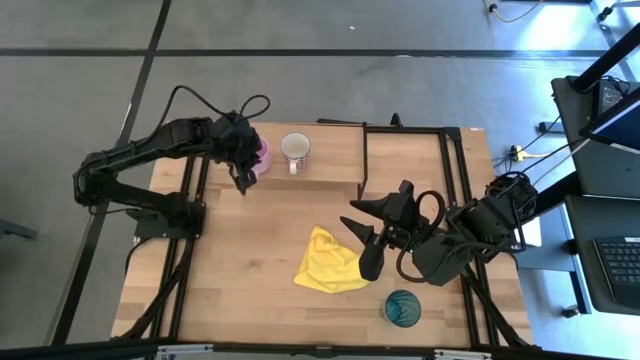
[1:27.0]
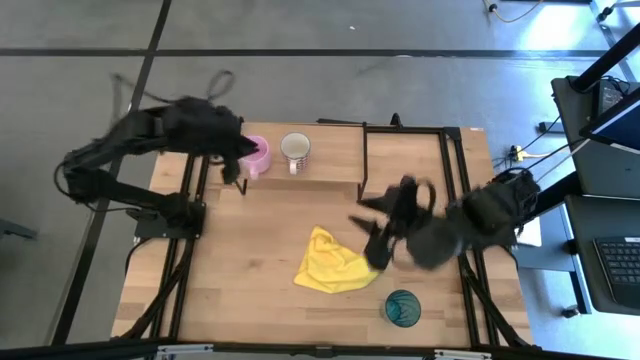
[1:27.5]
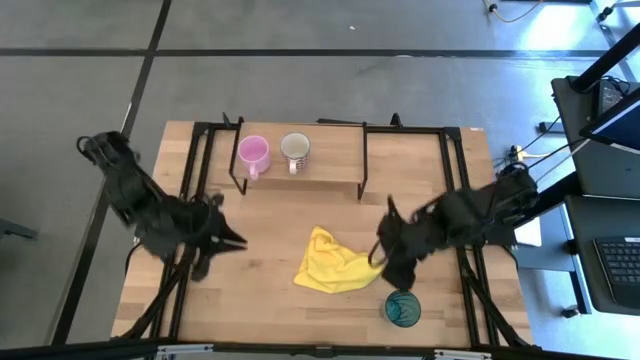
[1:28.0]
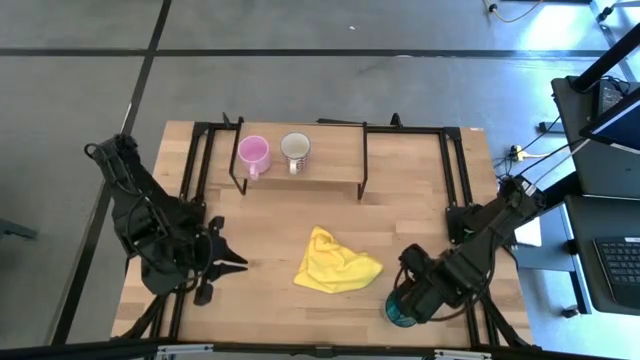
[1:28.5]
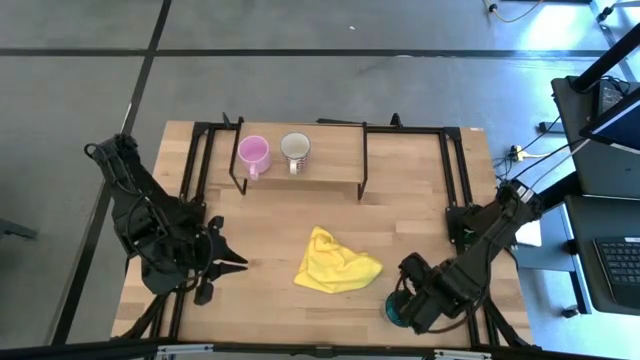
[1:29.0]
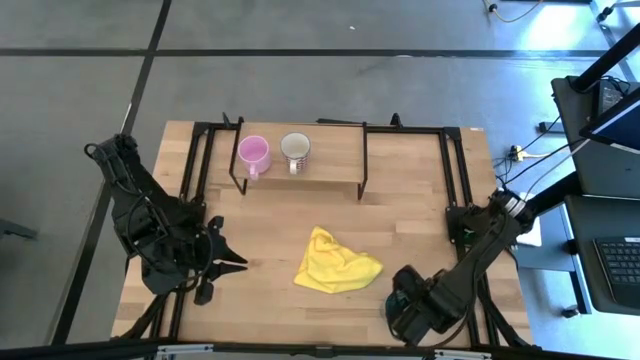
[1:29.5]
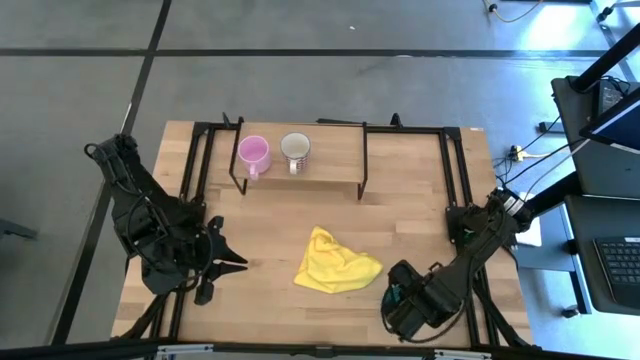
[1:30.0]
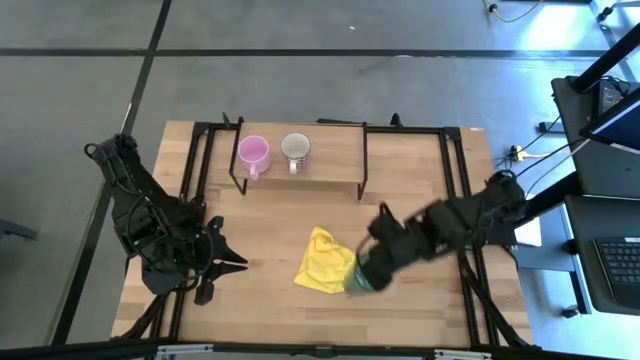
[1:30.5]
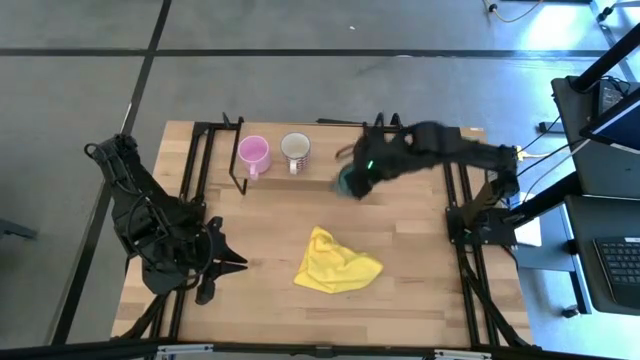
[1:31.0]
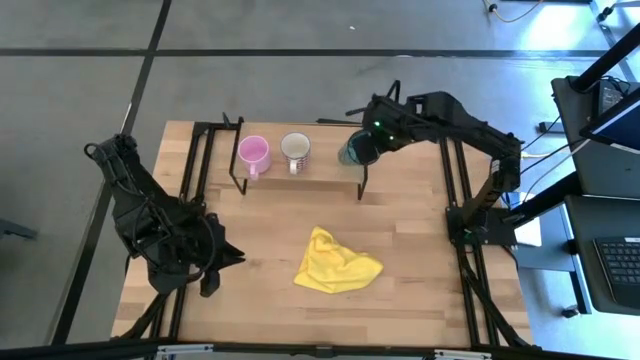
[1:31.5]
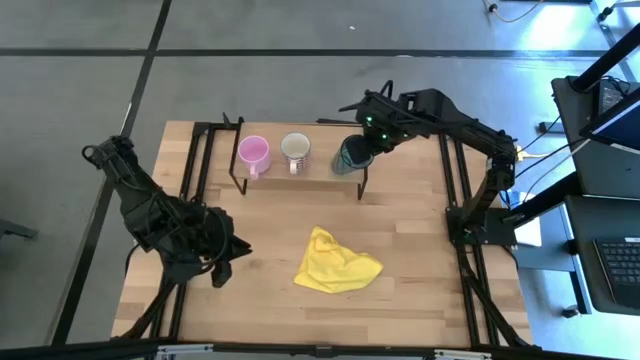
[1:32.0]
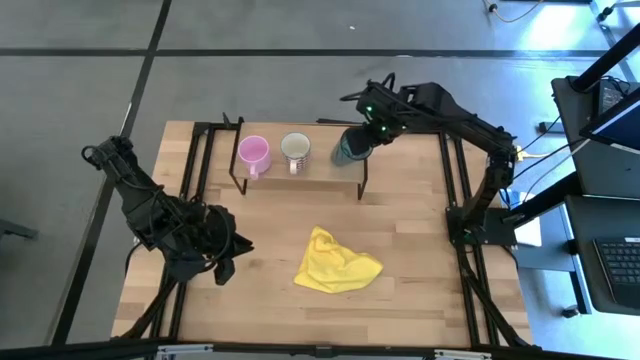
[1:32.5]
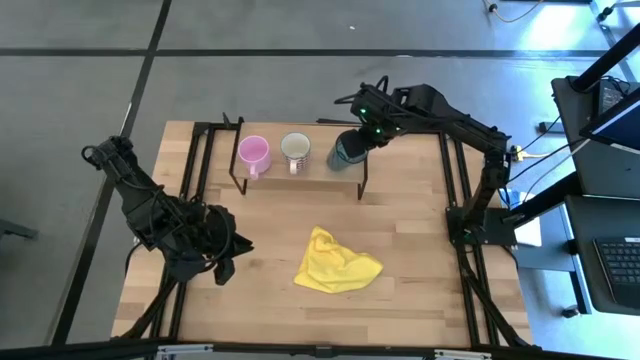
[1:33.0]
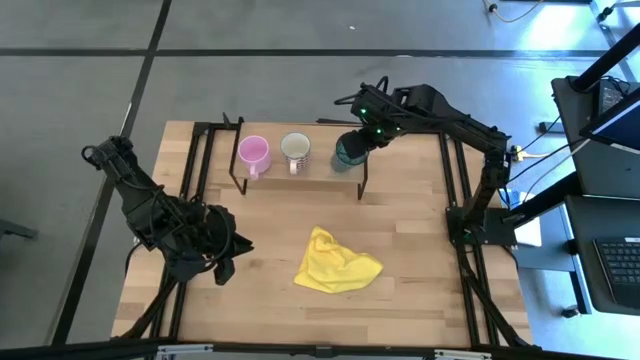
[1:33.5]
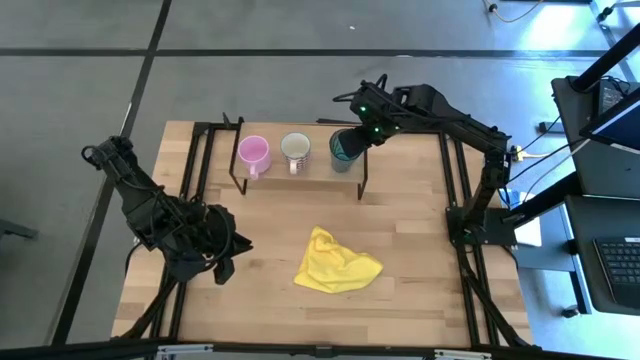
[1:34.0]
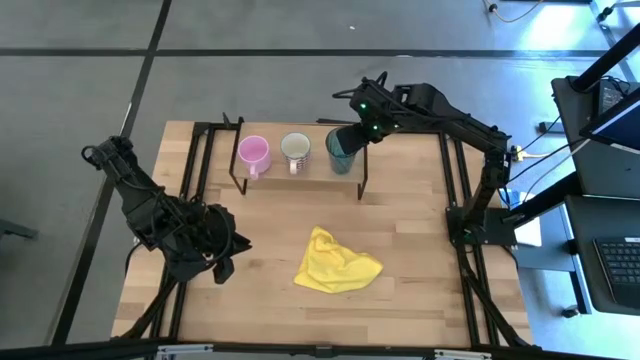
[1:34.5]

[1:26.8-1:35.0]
Task: Stack small to large cups/mugs on shelf
Put the blue cup on the shelf

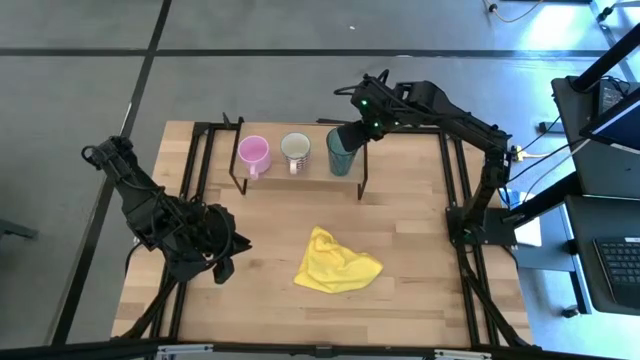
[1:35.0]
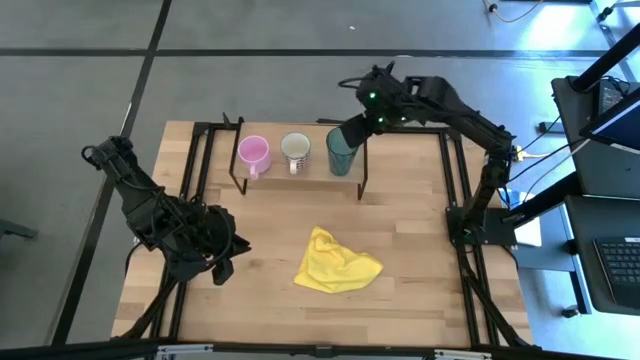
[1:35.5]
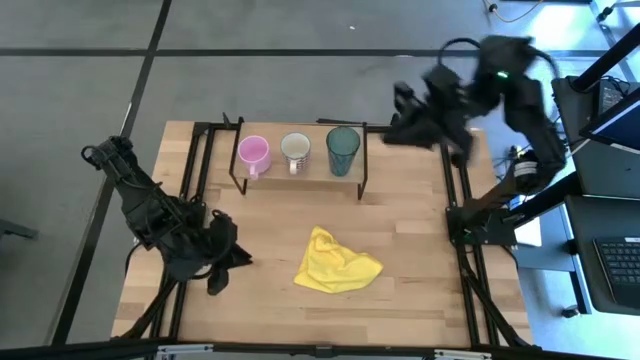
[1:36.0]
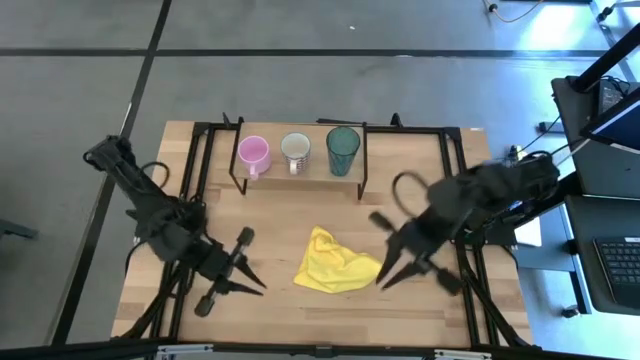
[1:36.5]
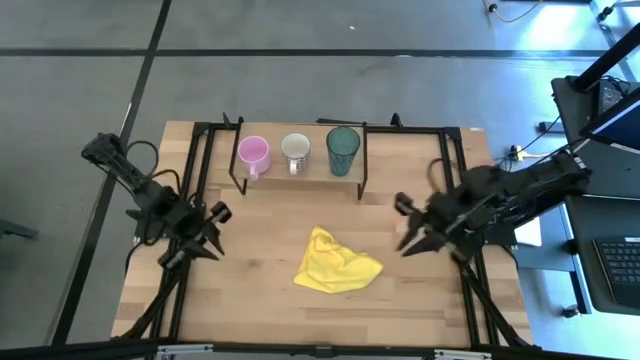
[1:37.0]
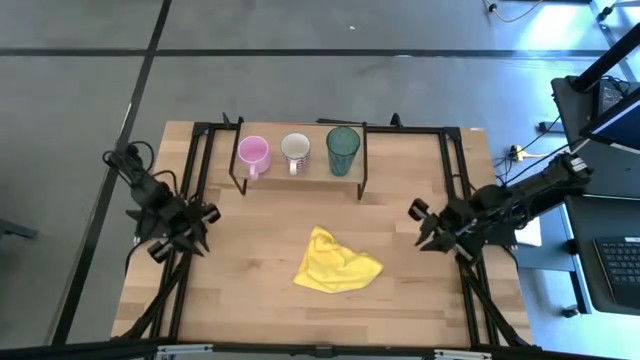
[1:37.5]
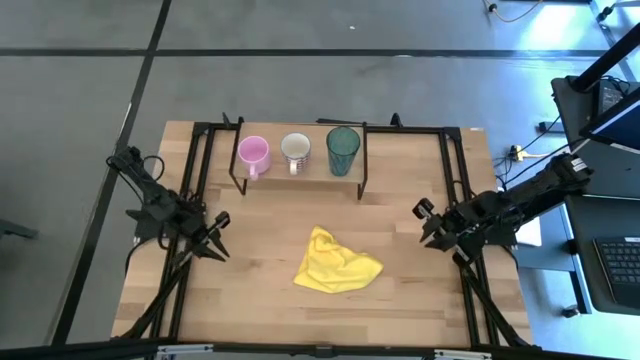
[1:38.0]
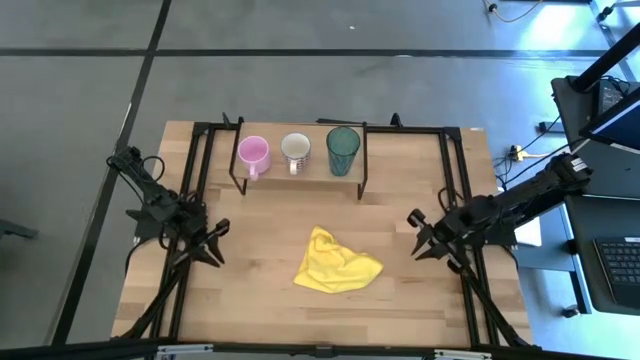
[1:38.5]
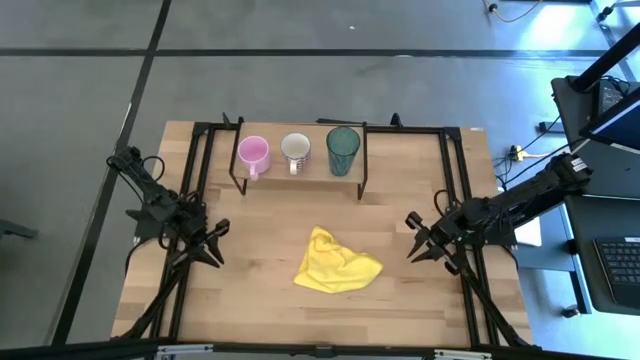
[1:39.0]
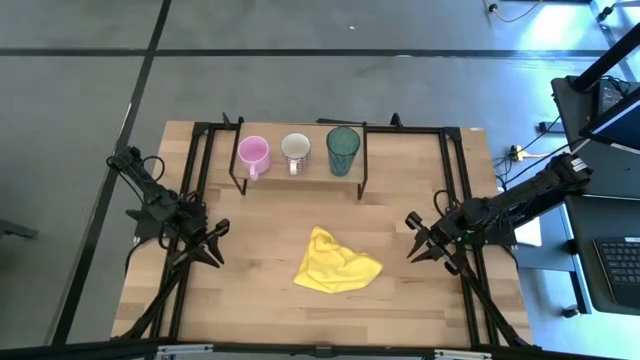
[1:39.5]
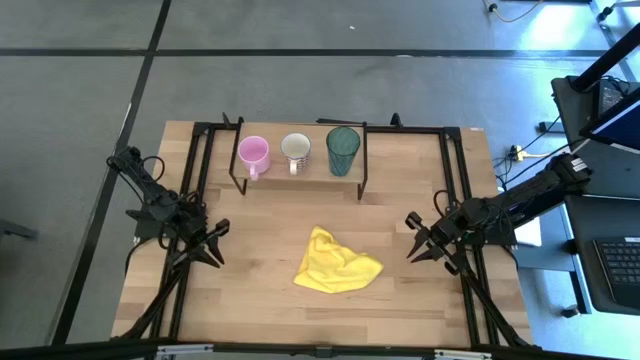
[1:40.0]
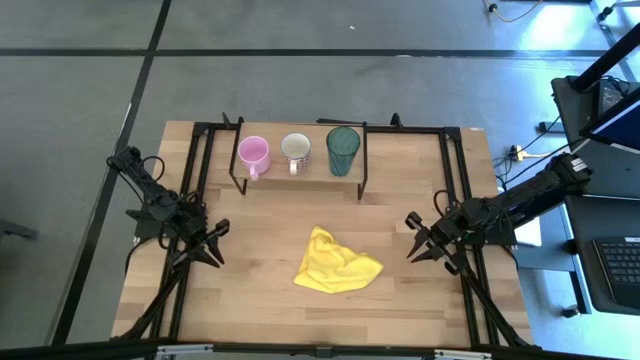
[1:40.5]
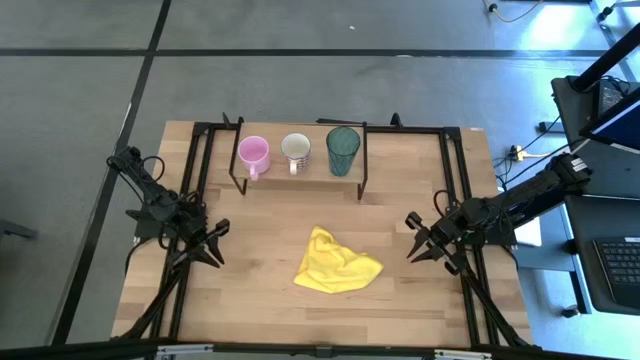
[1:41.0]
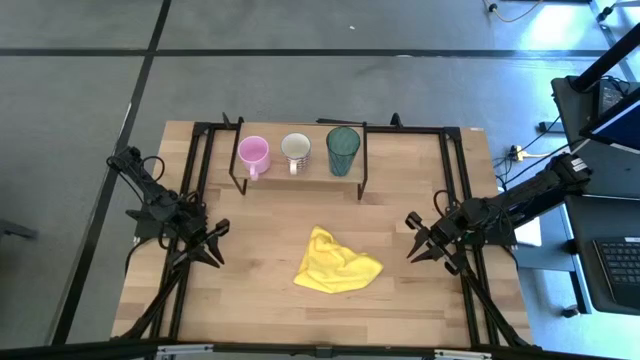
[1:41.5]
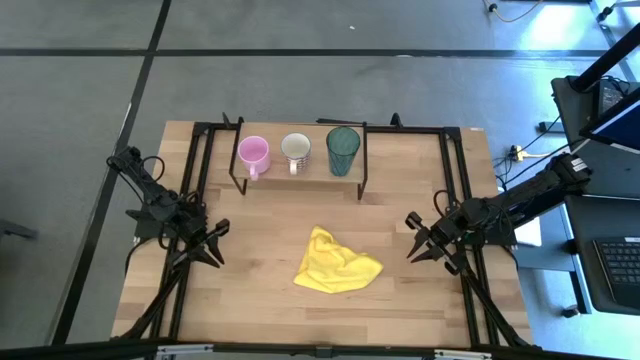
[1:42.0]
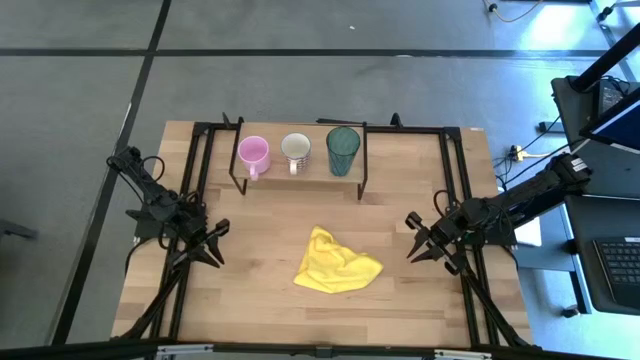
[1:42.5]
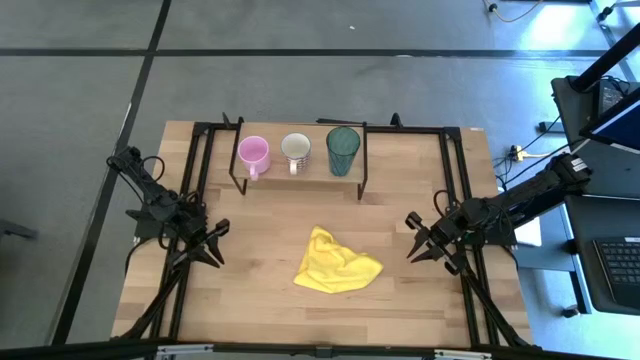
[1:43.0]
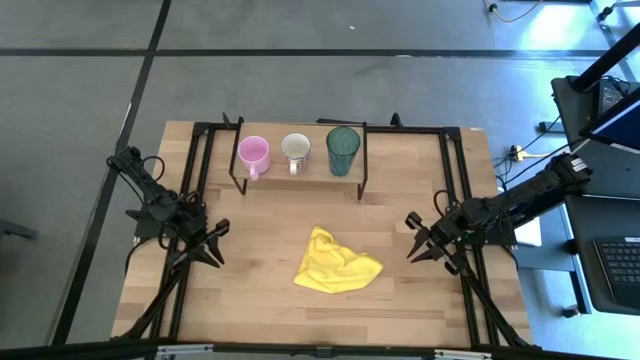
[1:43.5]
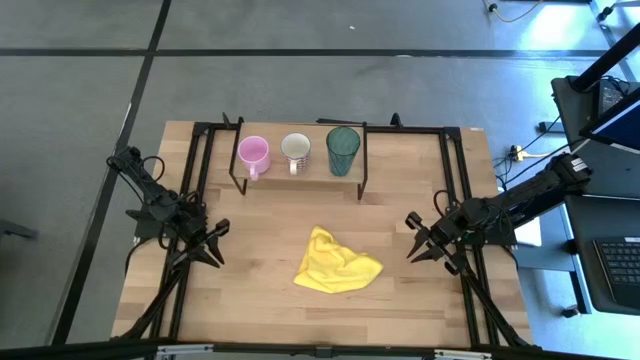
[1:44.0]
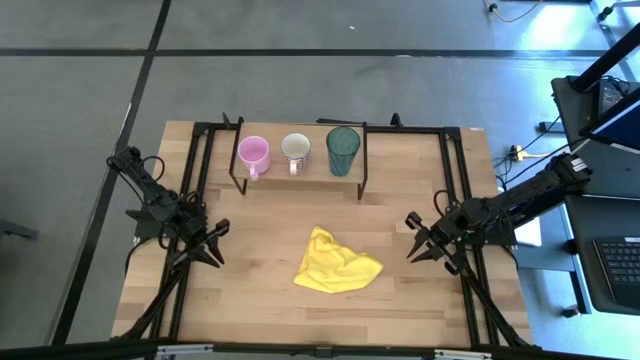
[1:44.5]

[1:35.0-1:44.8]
Return to Home Position
